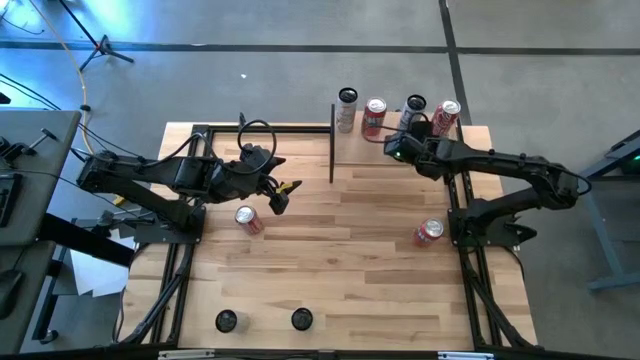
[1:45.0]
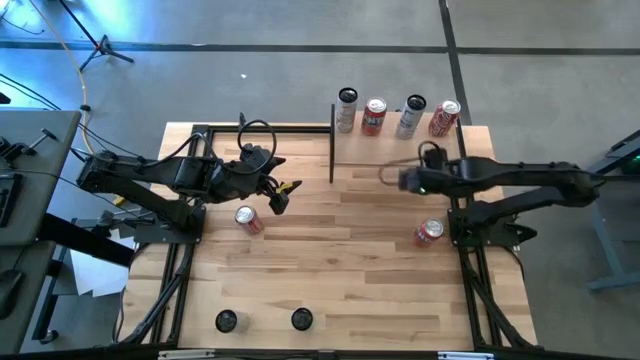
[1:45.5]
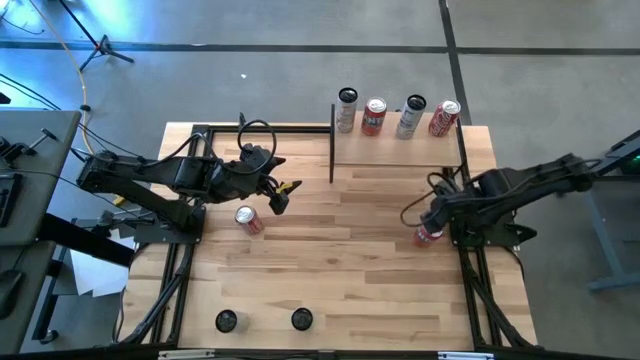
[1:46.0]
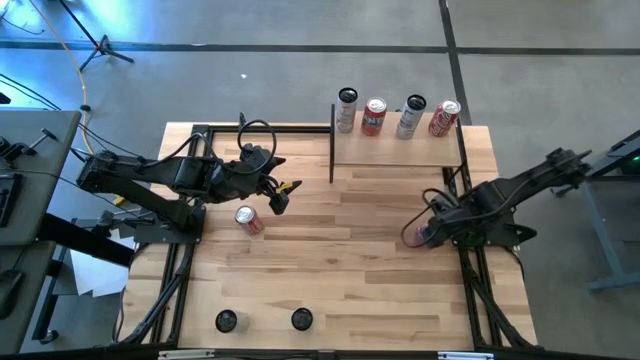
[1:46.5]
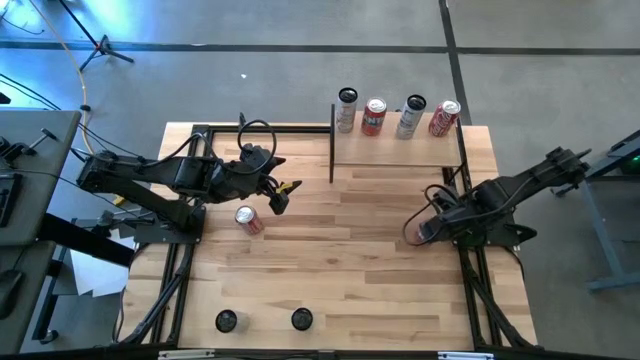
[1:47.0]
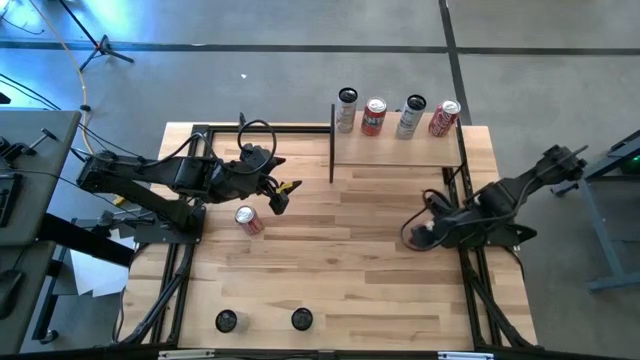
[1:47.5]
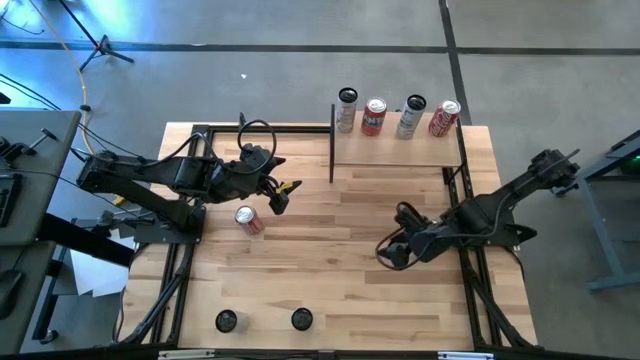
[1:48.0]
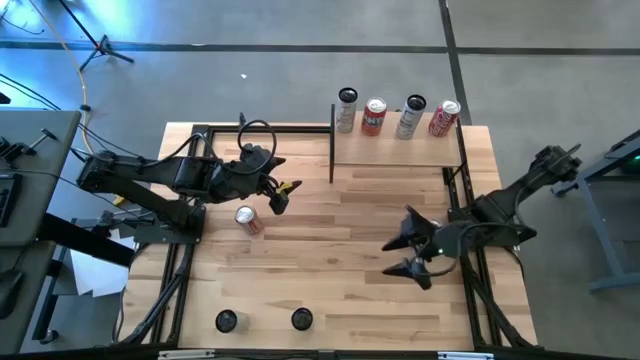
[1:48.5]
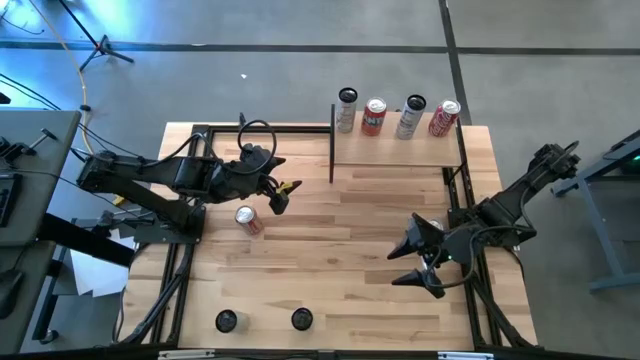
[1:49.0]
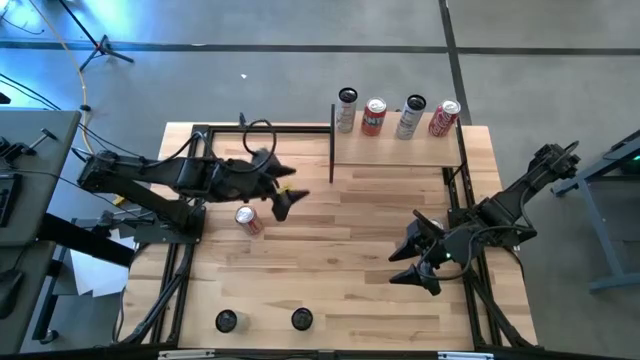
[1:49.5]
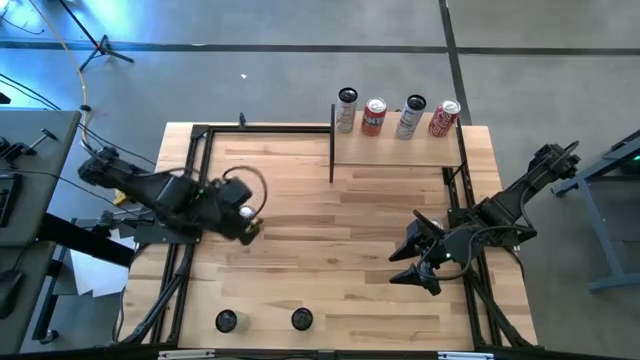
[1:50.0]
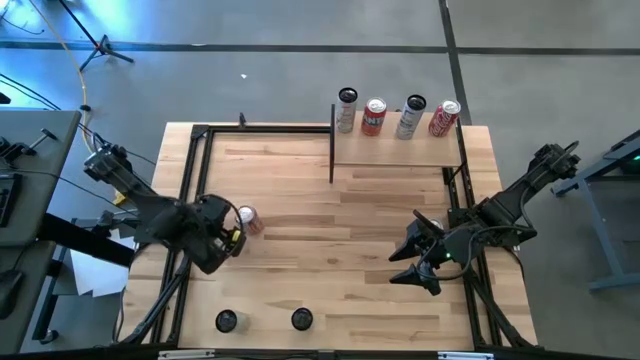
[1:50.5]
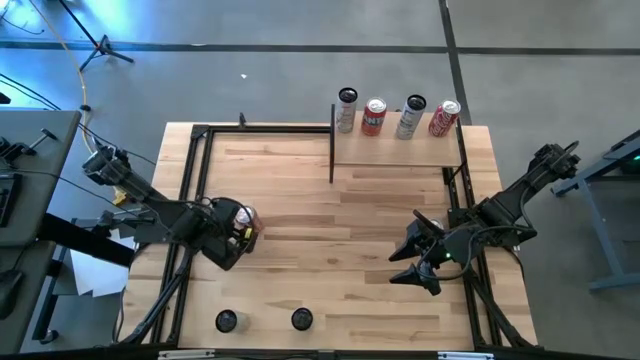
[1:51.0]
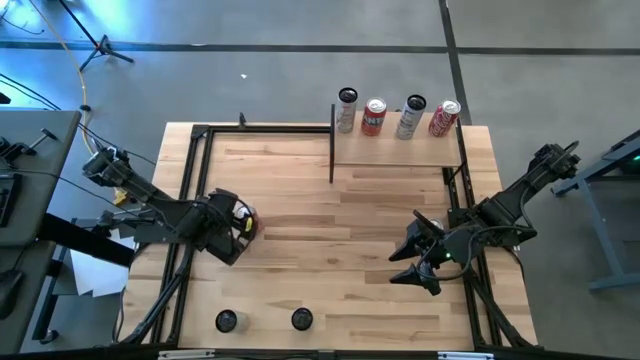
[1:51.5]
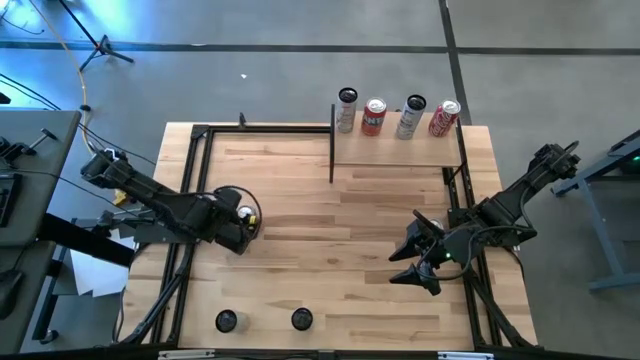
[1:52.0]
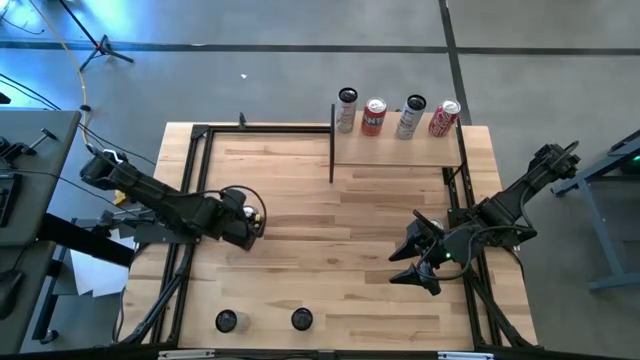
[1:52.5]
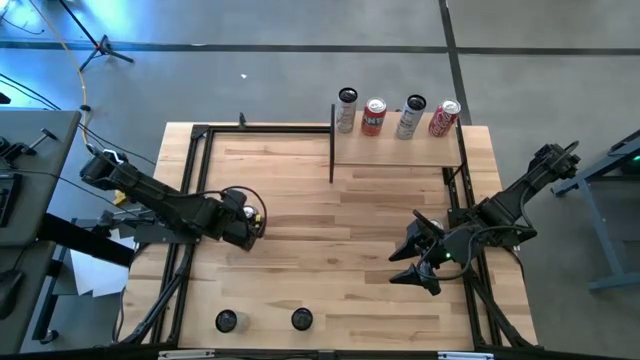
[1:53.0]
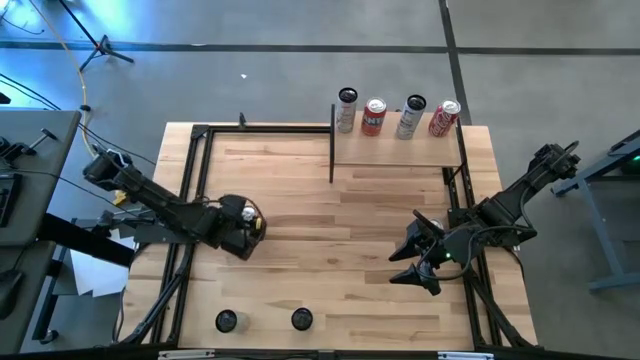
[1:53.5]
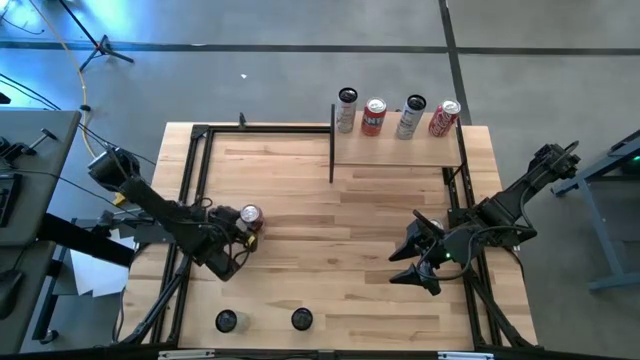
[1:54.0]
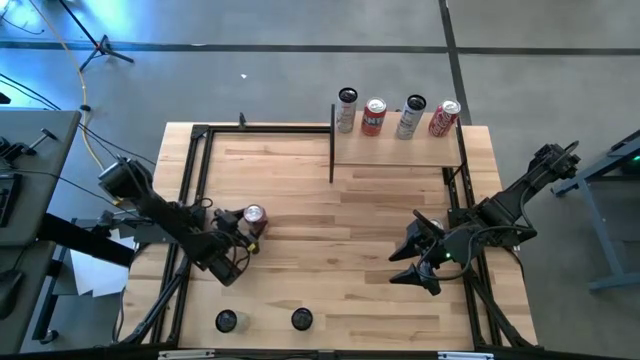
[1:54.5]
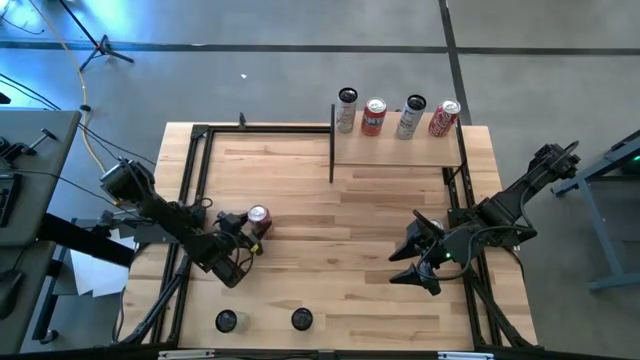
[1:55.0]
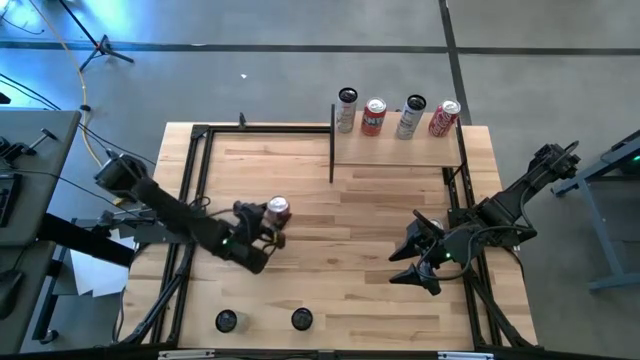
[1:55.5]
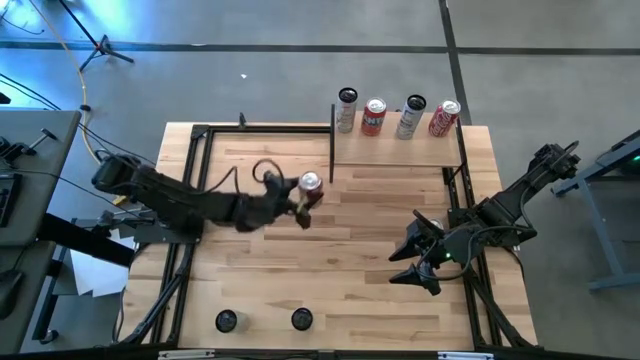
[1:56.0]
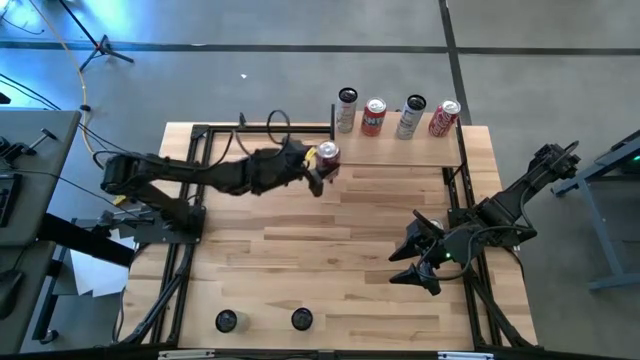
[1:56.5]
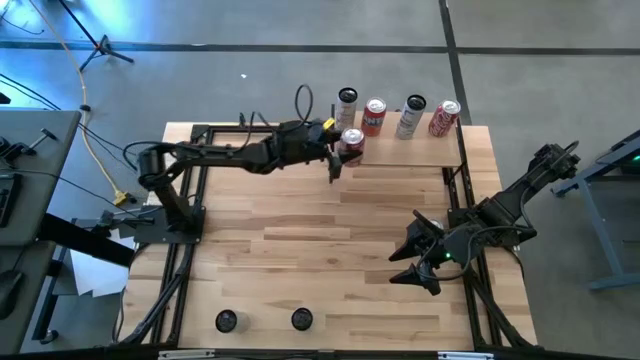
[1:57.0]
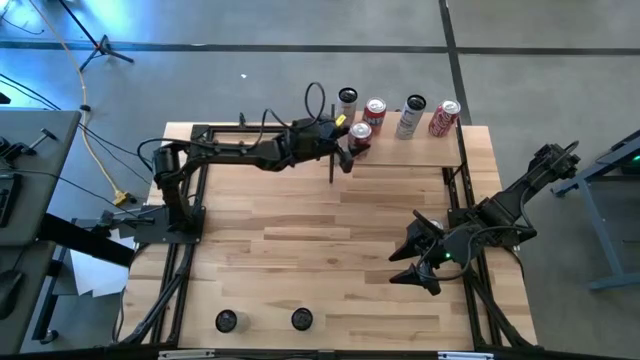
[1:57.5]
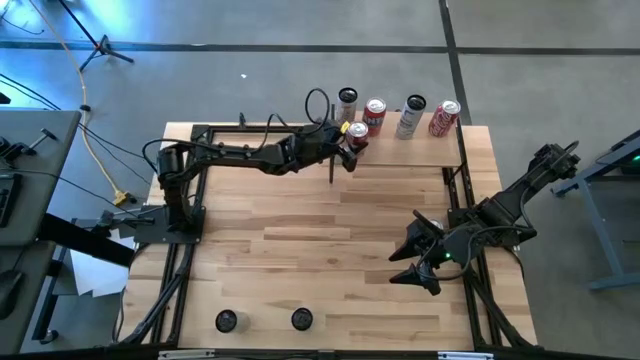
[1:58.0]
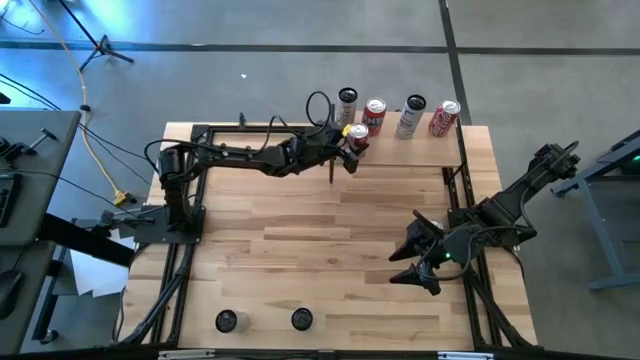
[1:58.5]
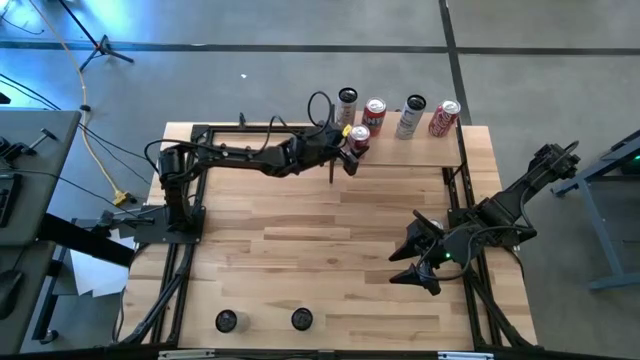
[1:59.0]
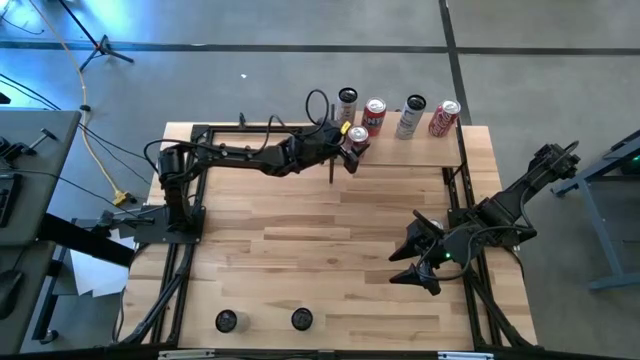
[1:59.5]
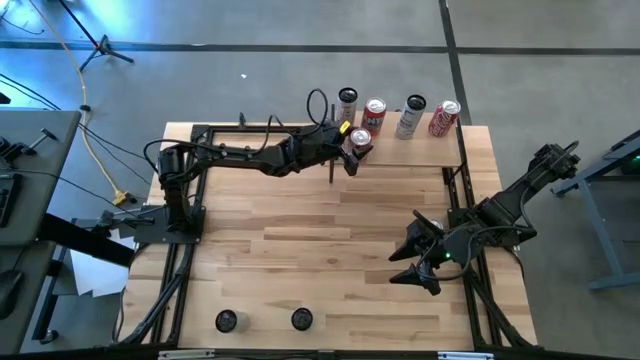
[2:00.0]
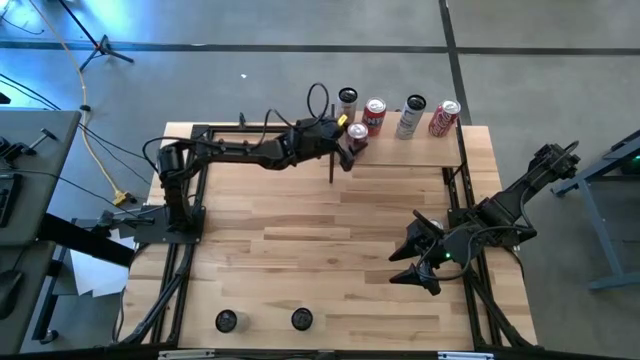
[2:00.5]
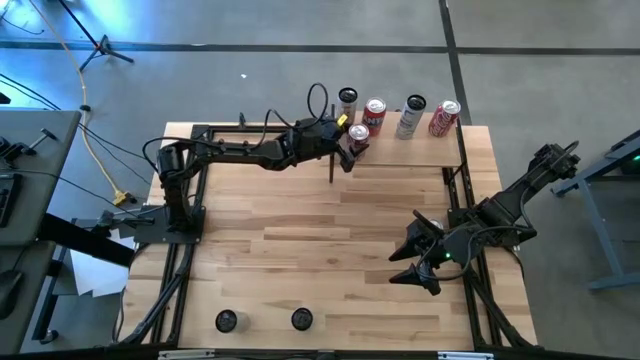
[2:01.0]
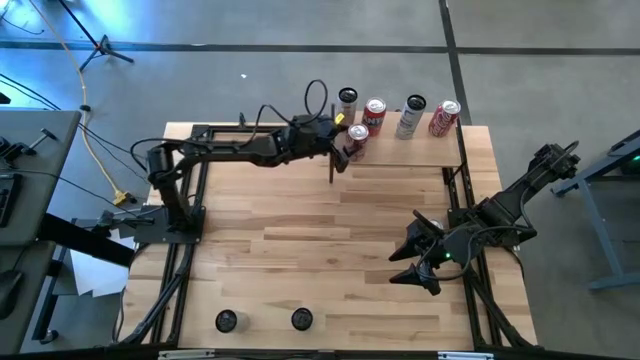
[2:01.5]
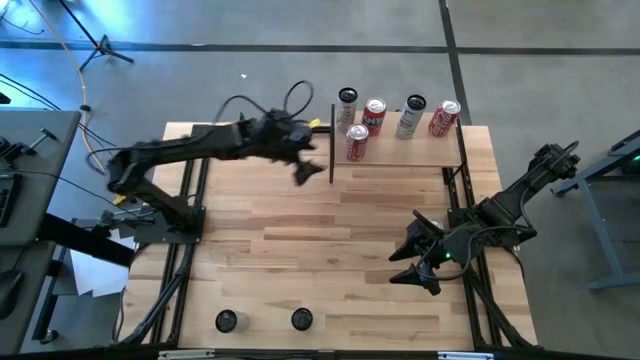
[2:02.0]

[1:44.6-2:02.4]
Task: Place canned beverage on shelf
Put the red white soda can on the shelf aligned with the other red white soda can

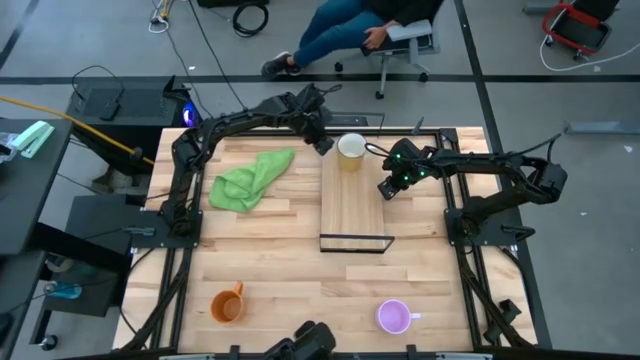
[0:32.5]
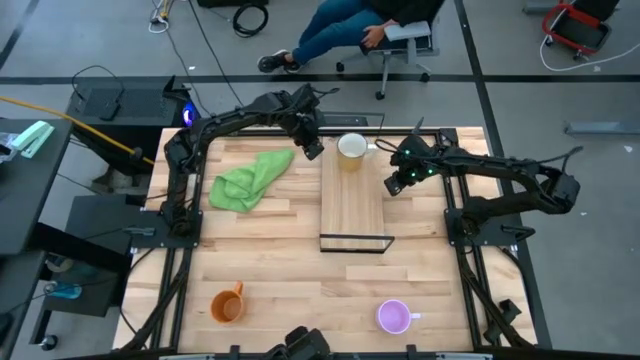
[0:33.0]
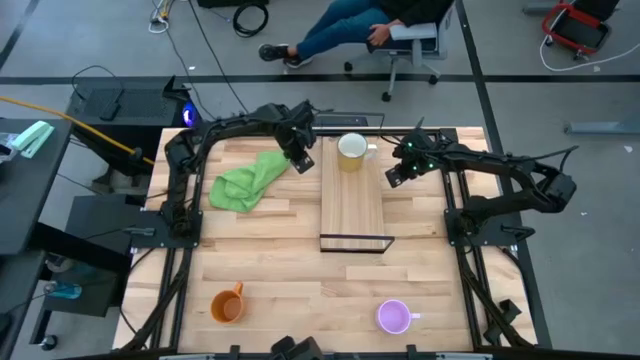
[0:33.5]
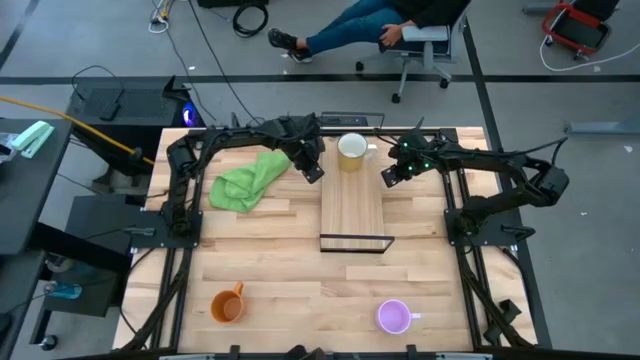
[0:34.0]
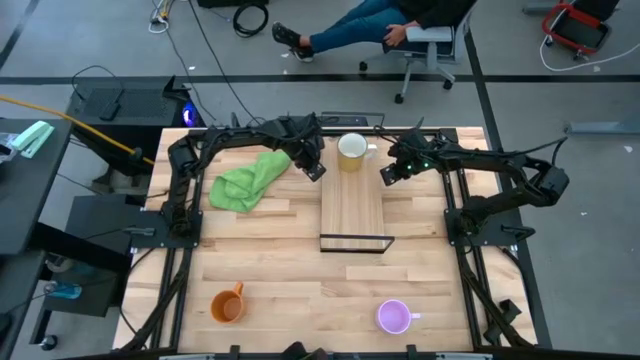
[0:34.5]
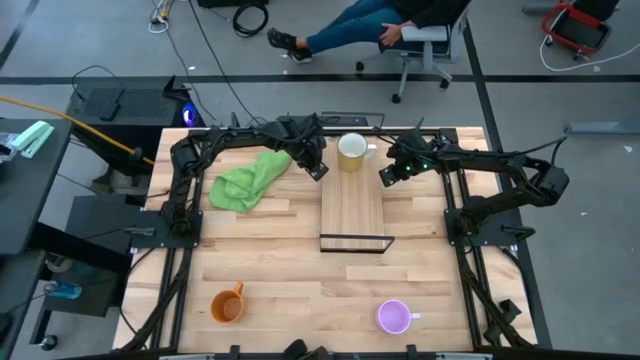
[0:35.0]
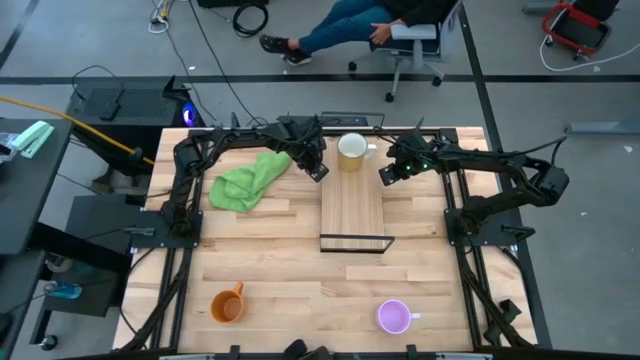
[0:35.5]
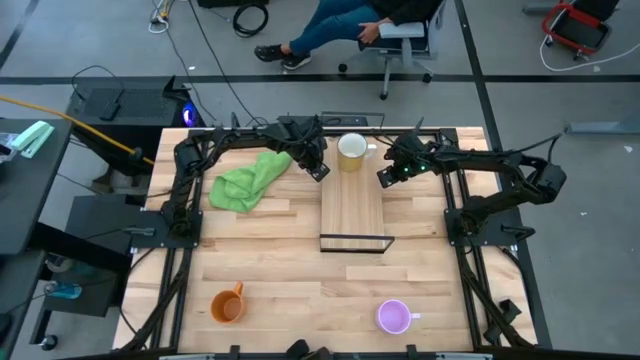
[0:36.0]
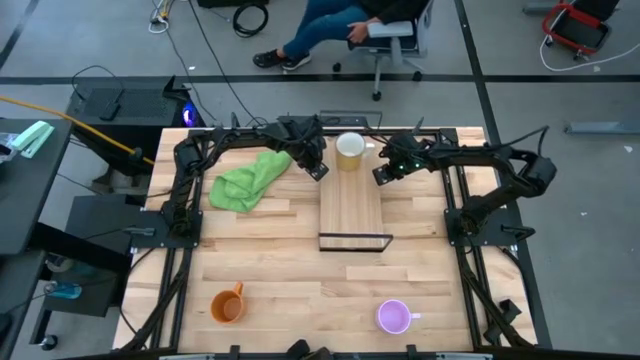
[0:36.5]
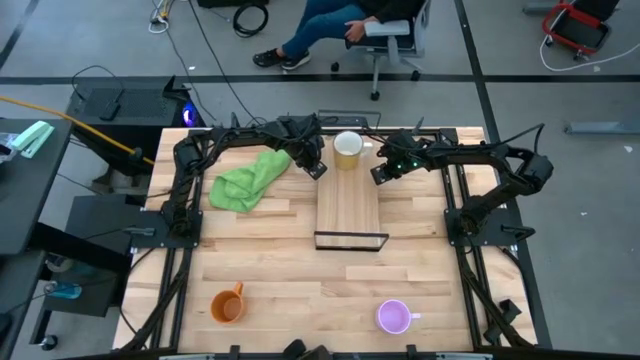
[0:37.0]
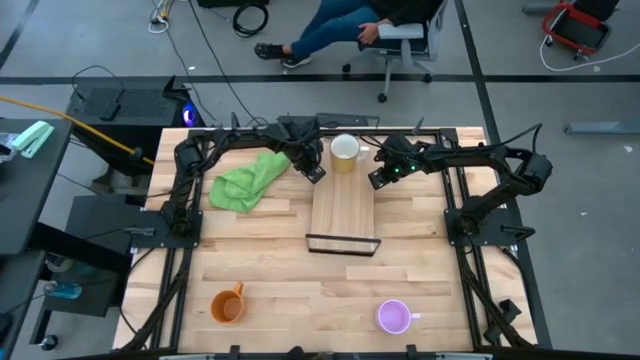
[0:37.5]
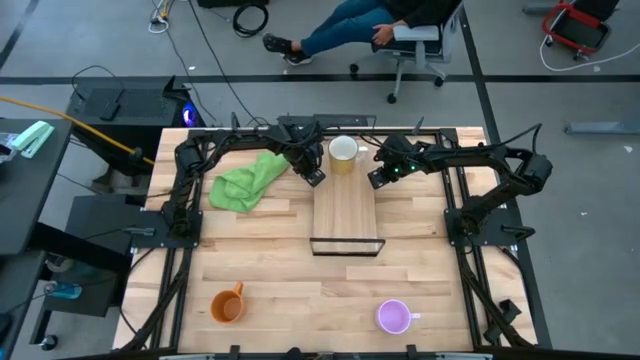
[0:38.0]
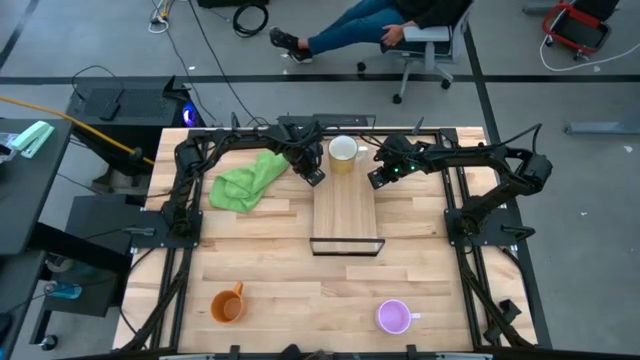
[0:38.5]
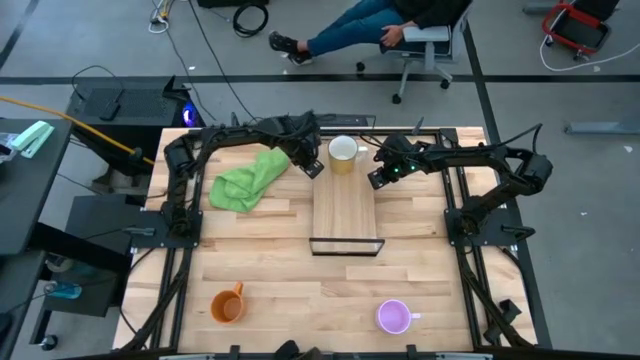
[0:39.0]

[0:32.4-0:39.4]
Task: Stack small to large cups/mugs on shelf
Adjust the shelf
